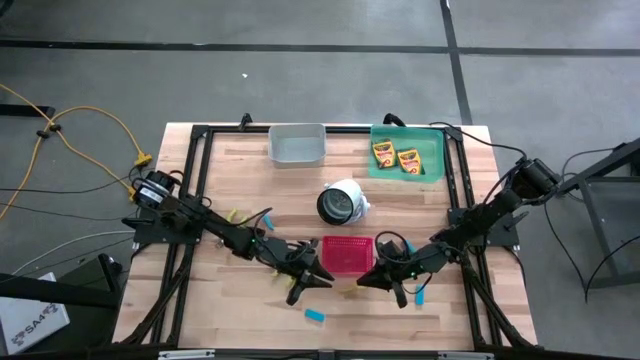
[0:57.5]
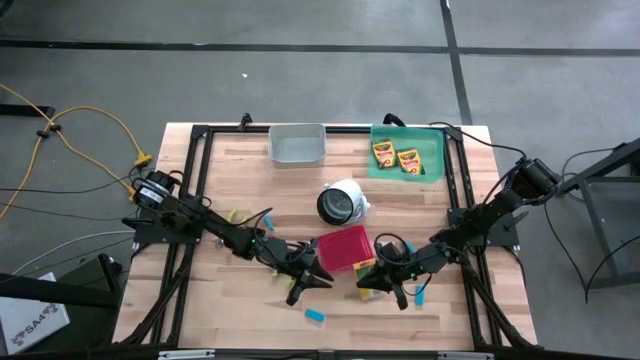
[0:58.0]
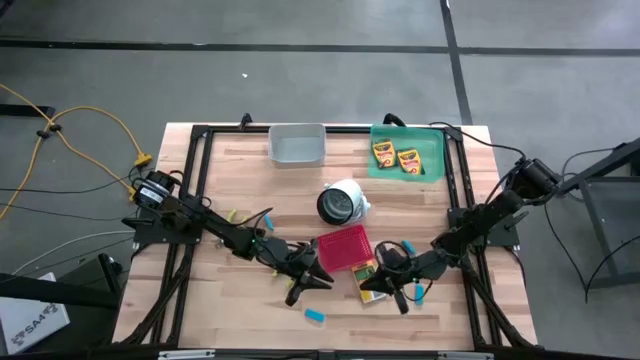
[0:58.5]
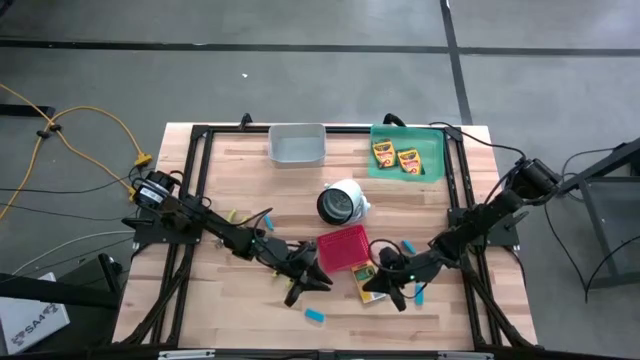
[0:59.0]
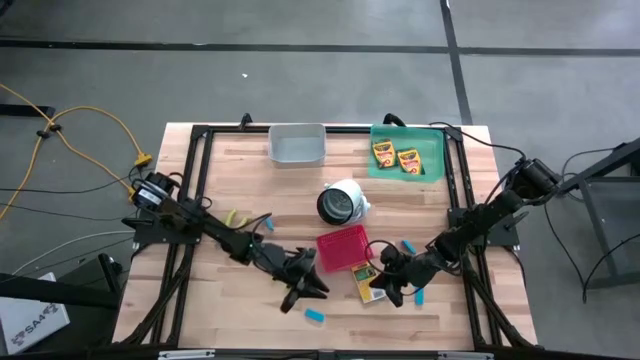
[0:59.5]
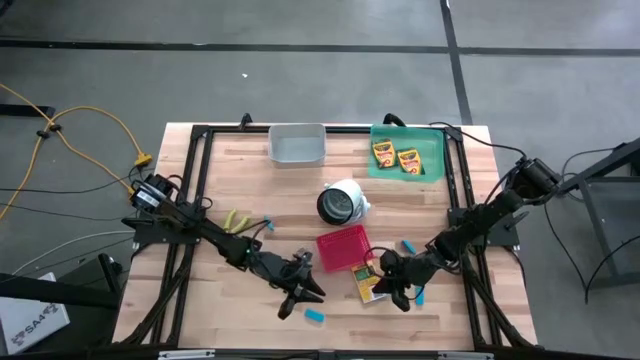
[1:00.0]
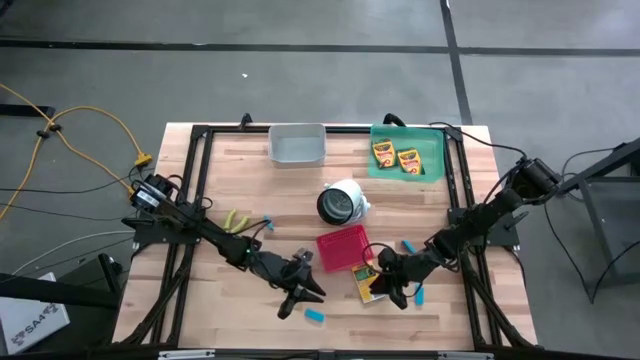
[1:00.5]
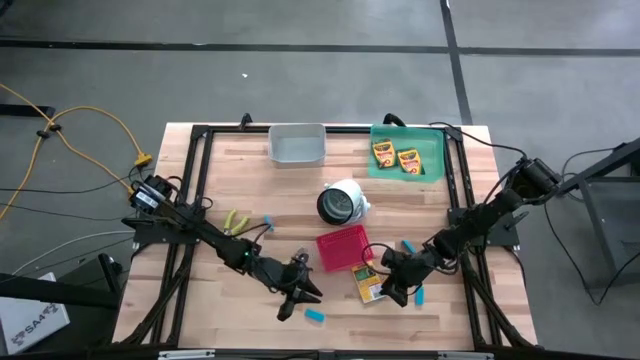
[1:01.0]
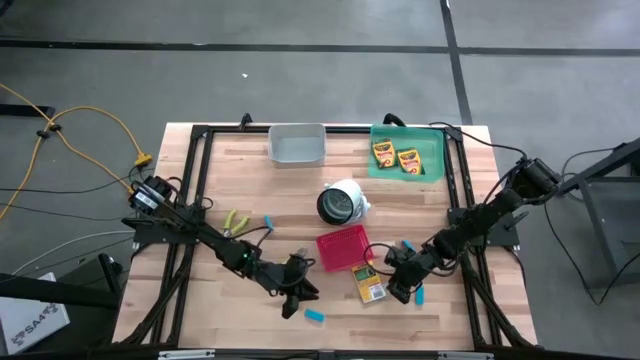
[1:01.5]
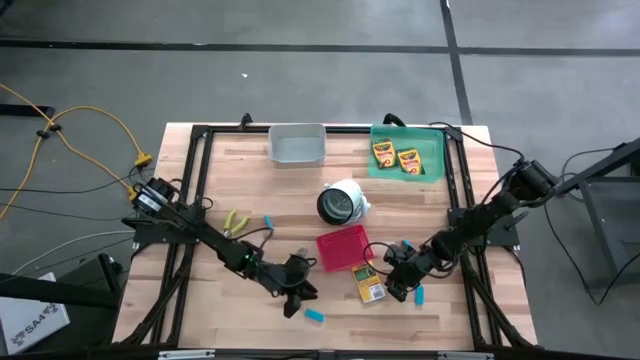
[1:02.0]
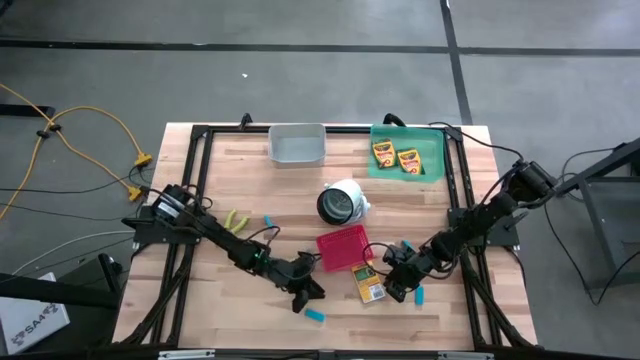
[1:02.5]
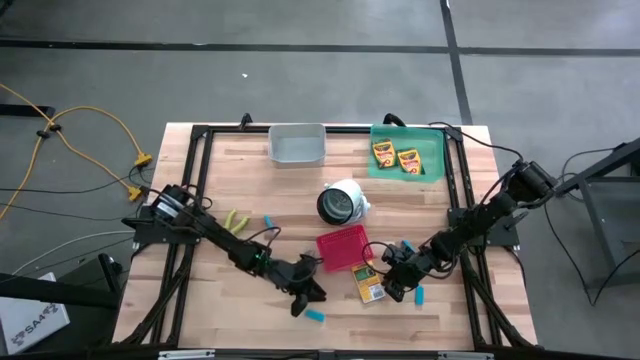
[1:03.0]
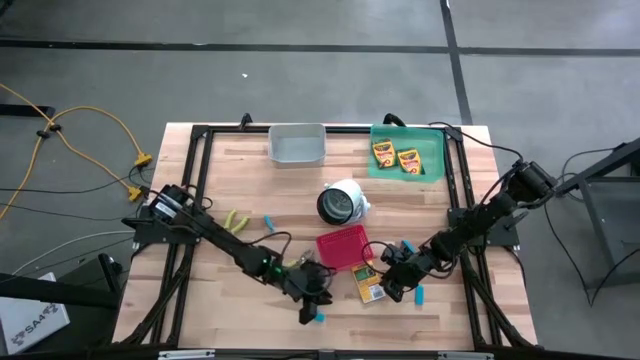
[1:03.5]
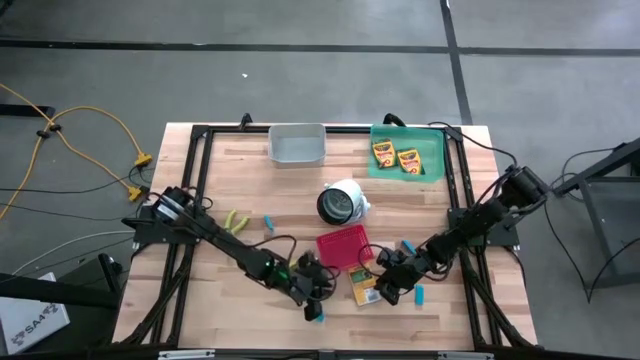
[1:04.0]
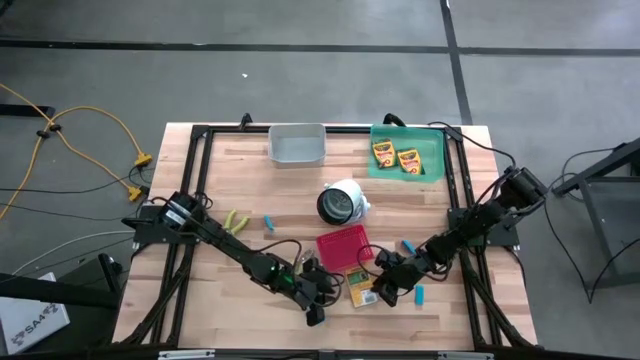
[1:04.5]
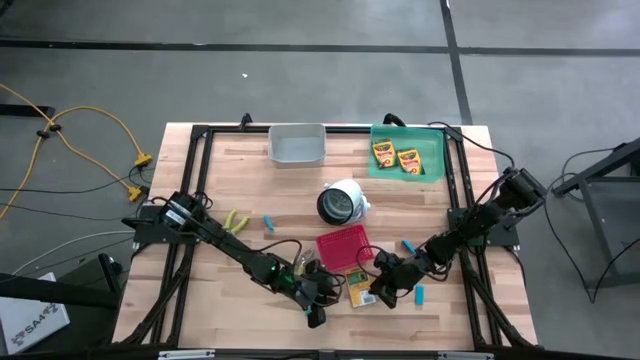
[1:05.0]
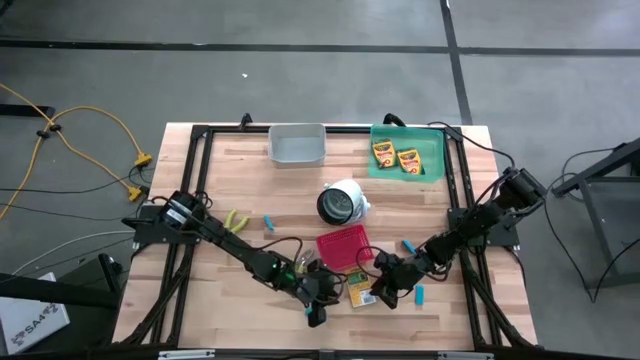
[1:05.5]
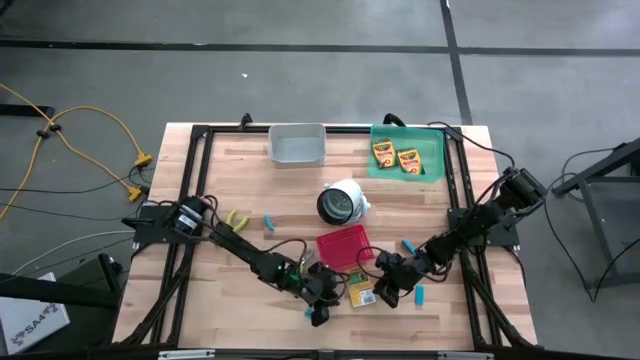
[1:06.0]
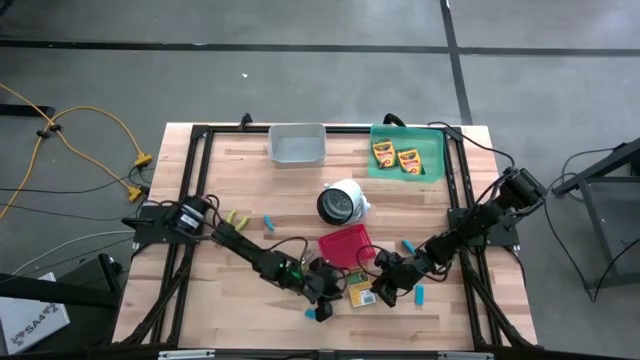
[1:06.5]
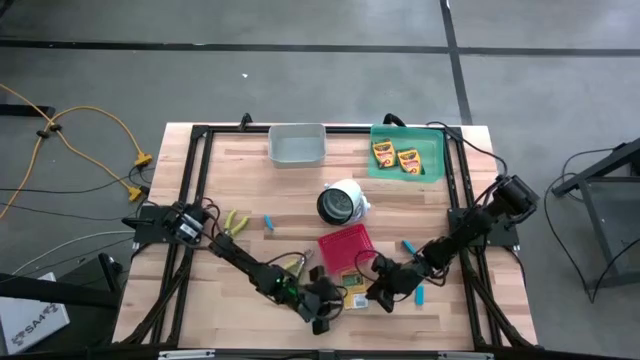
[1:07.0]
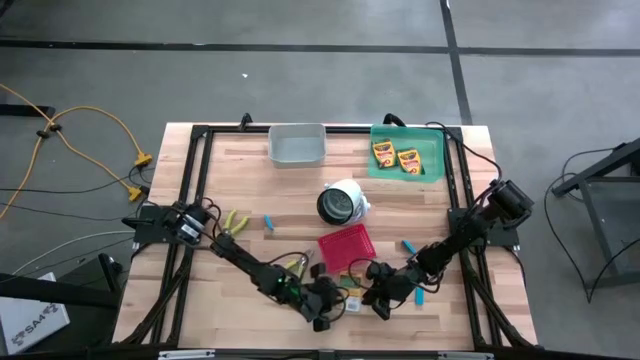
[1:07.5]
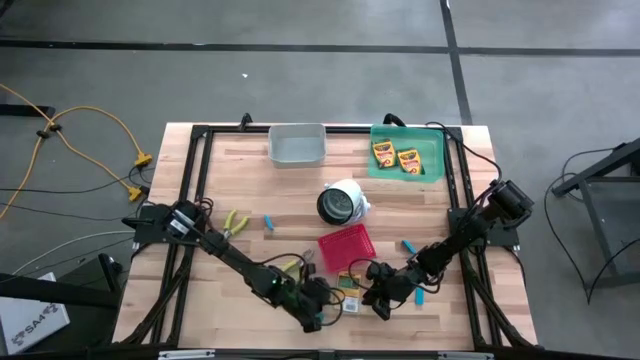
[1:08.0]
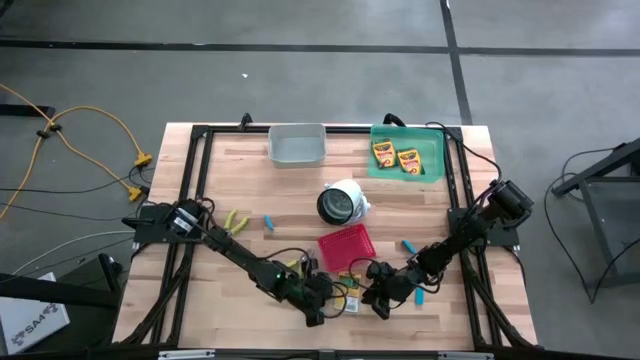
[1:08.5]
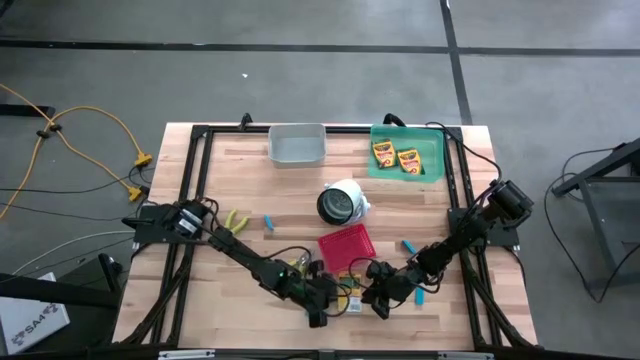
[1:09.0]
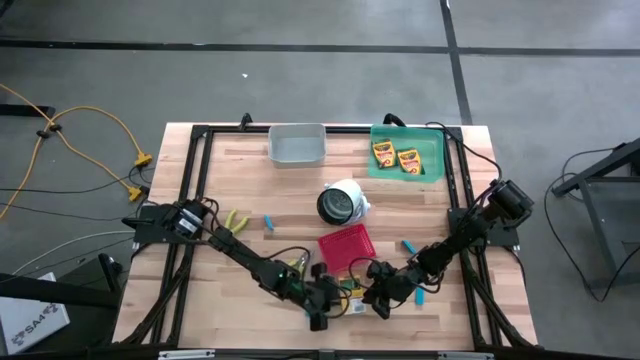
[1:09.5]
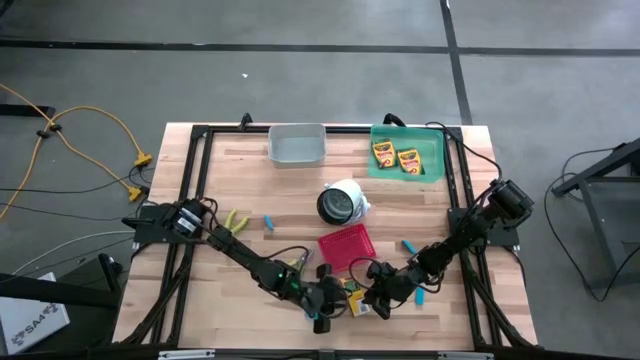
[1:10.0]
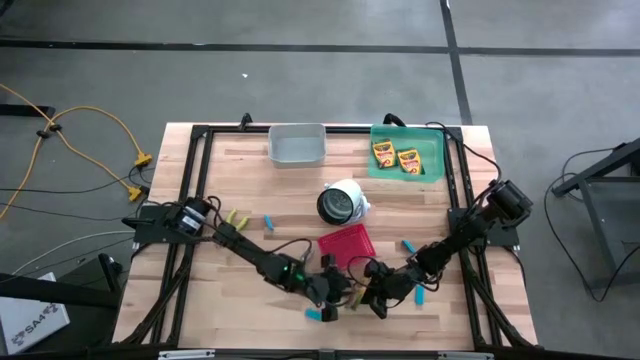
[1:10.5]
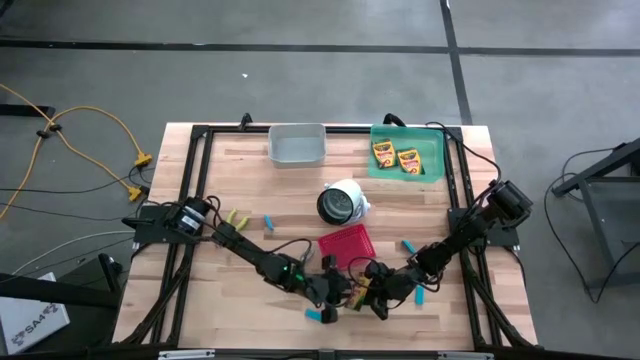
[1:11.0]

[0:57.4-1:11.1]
Task: Pick & Place School Supplies
Put the yellow crayon box into the green bin
